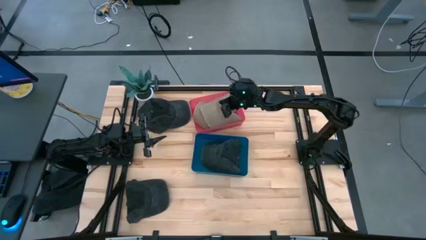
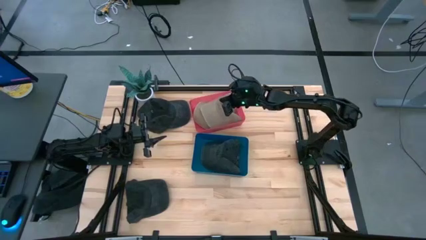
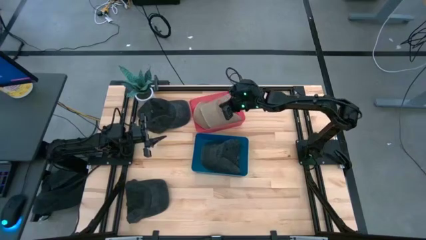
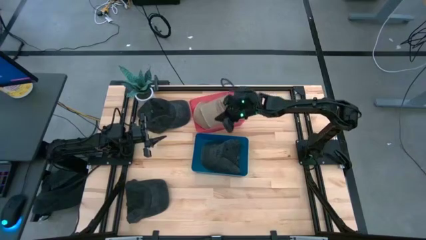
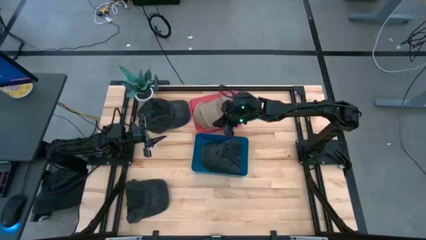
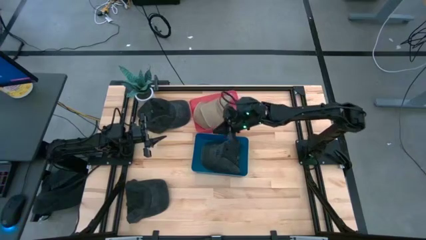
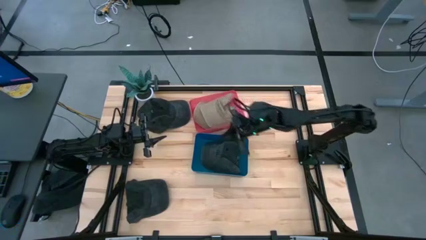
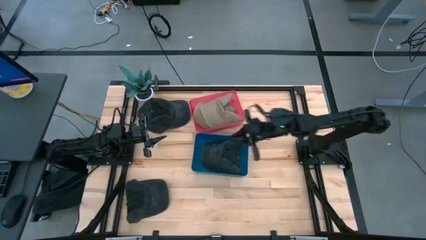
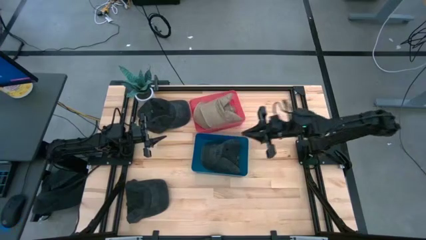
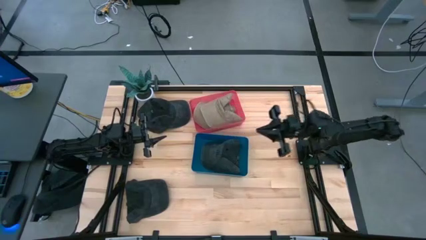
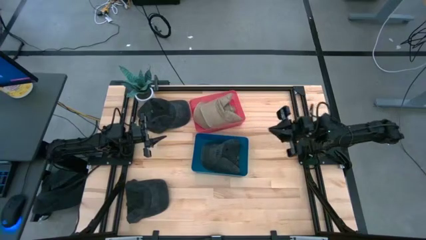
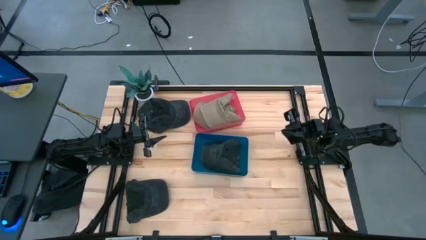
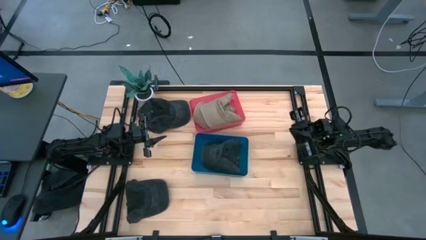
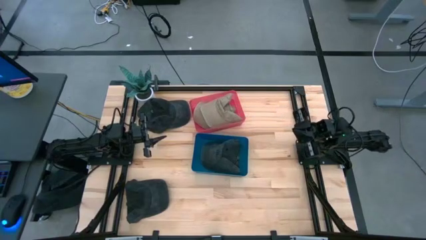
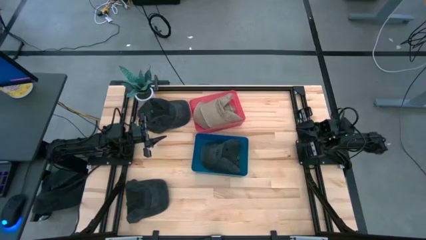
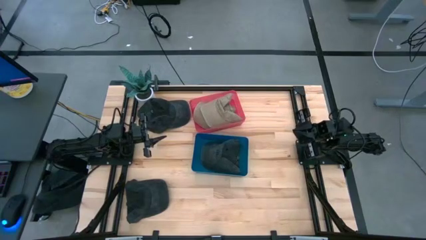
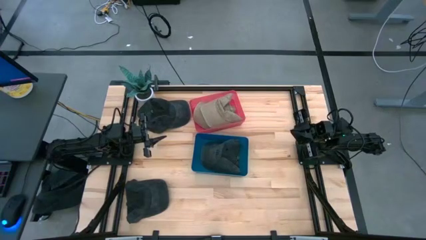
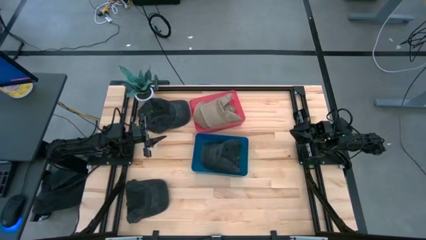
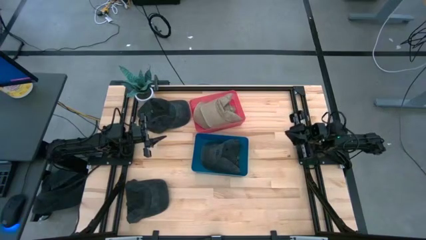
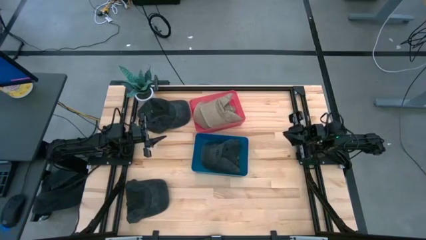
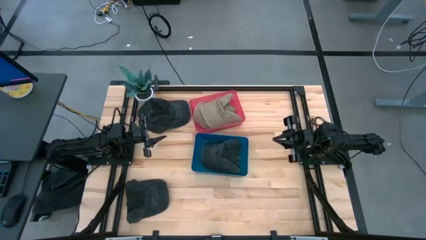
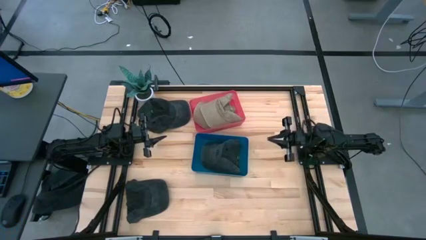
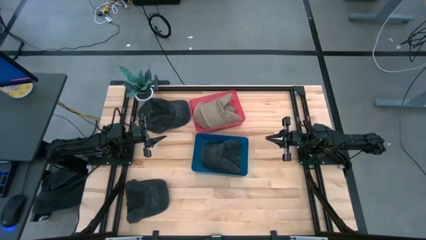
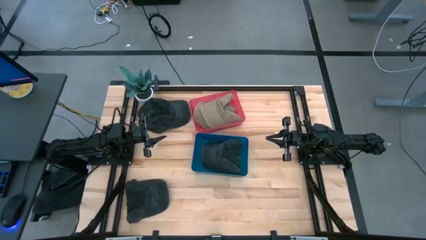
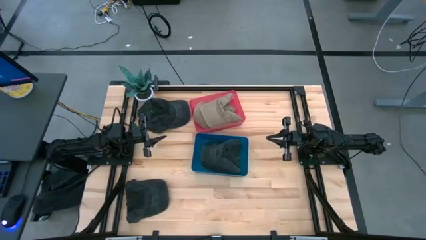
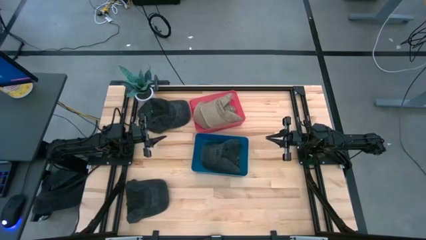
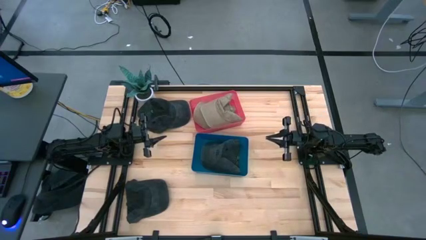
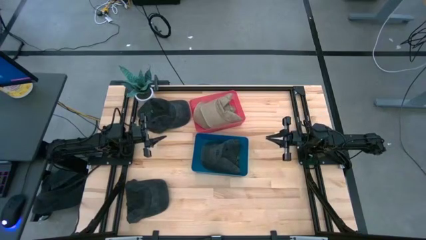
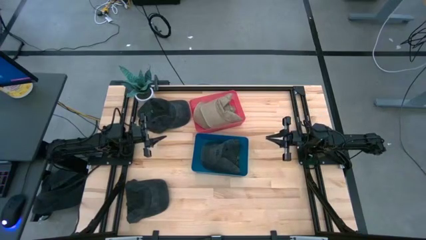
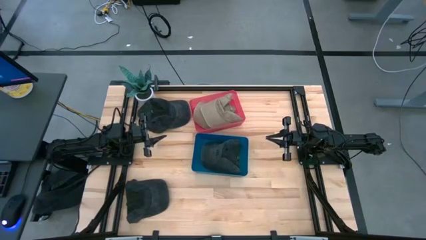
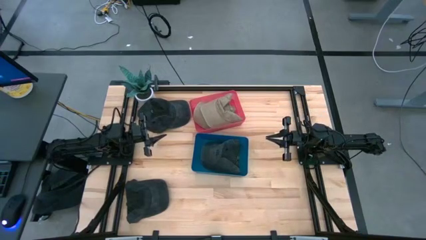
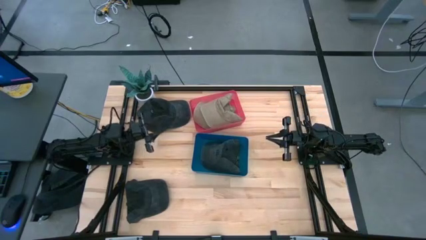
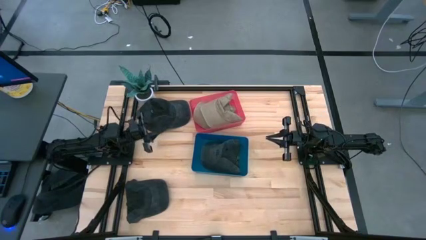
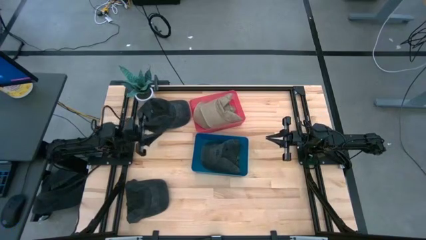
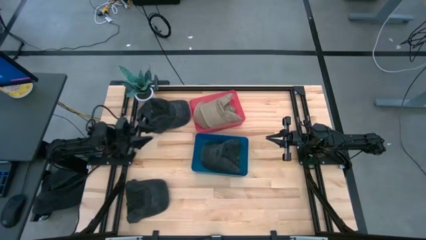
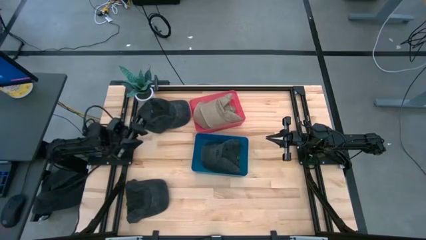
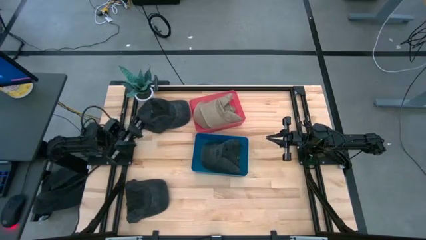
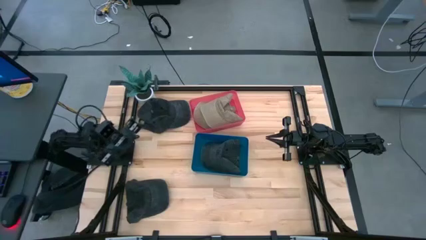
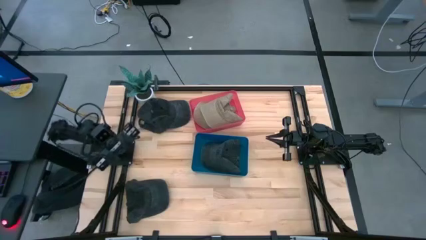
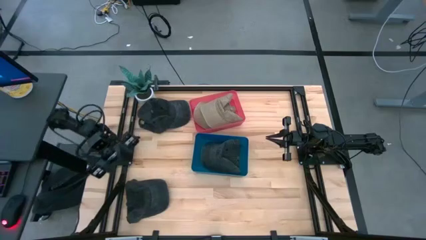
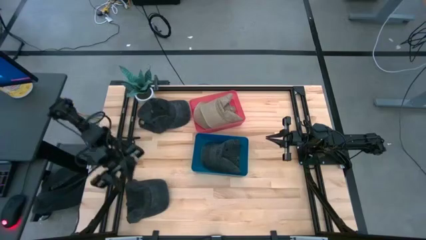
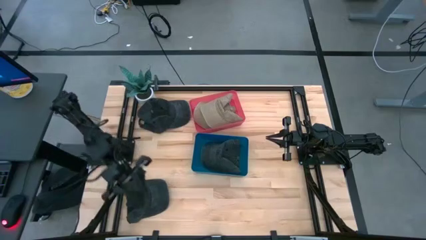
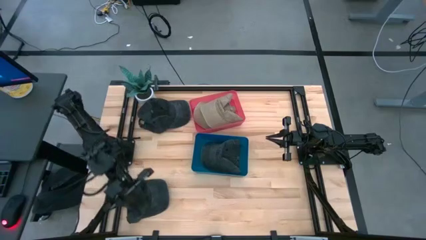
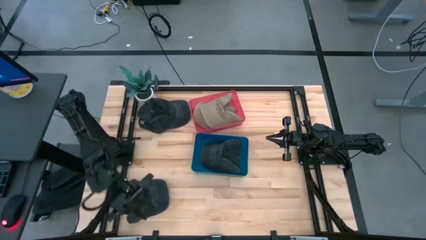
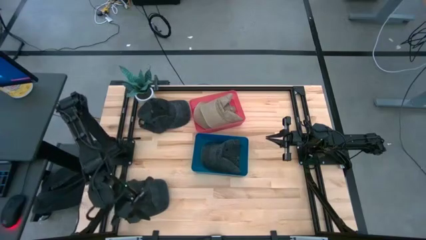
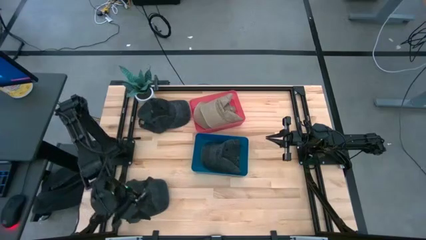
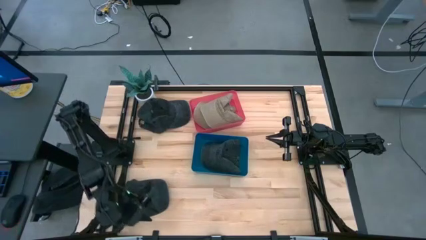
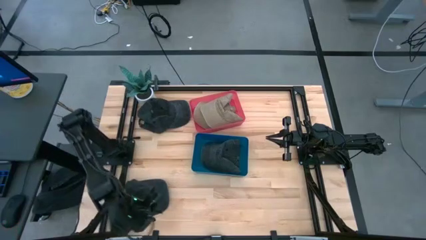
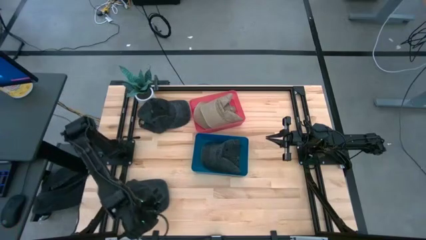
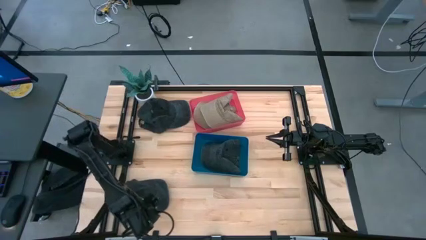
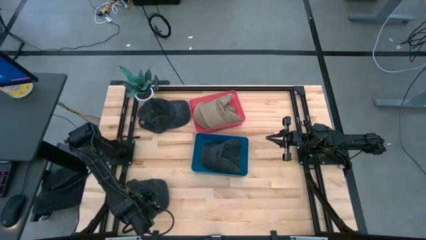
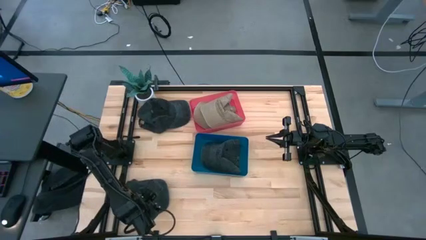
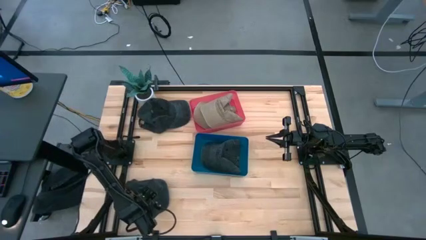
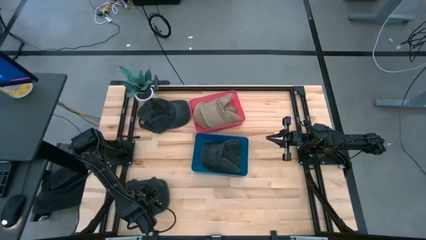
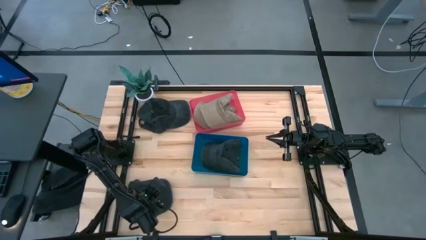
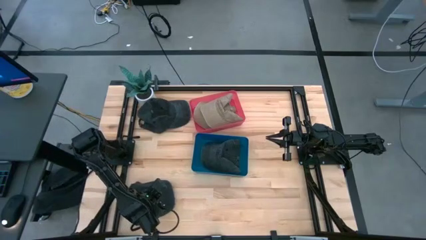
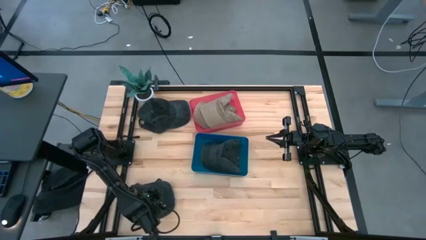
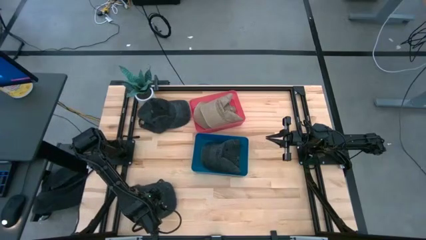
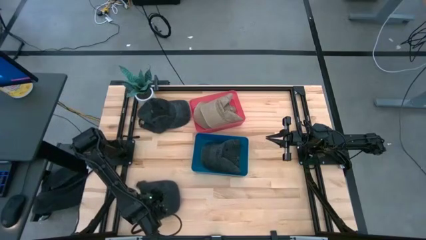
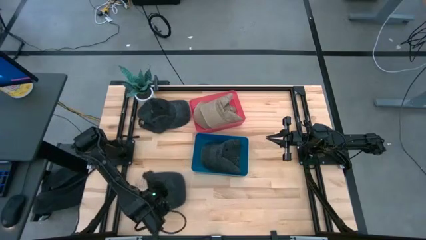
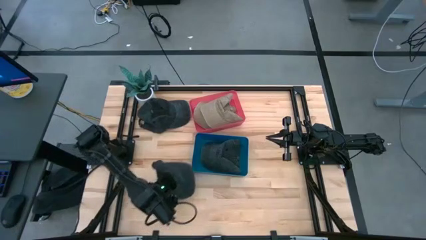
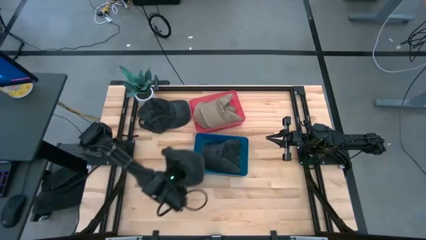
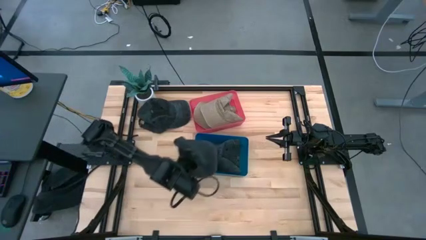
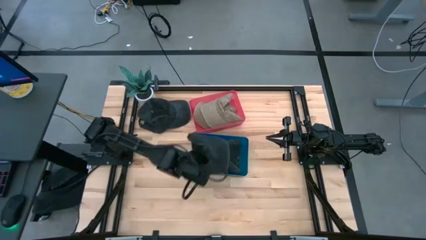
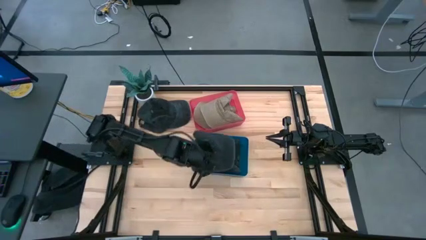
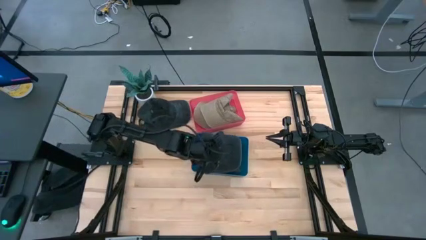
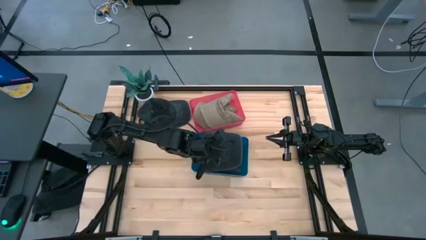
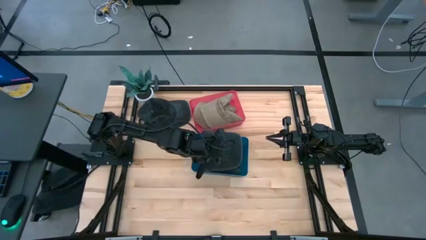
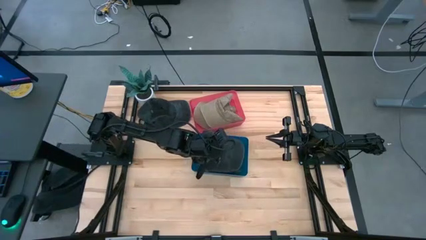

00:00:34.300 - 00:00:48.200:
Task: Pick & Place hat
Put the bottom black cap into the blue bin
